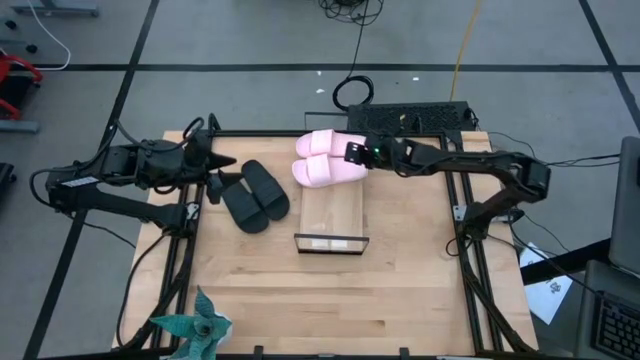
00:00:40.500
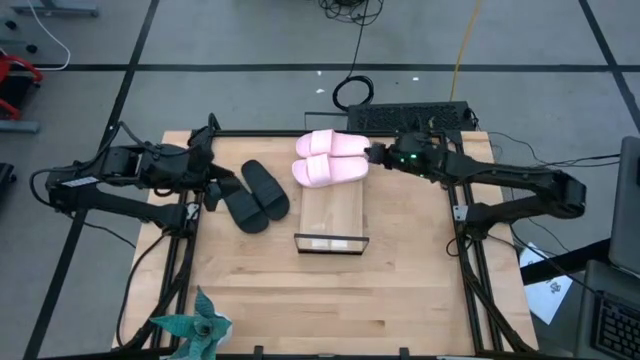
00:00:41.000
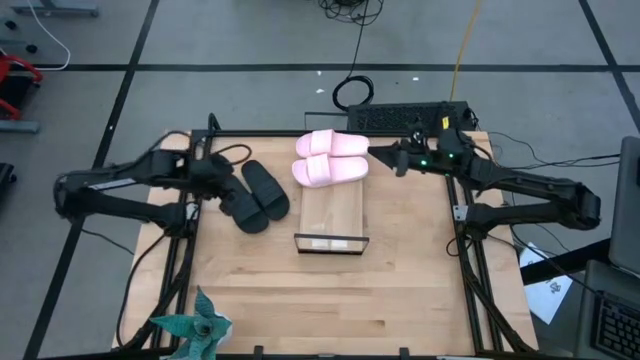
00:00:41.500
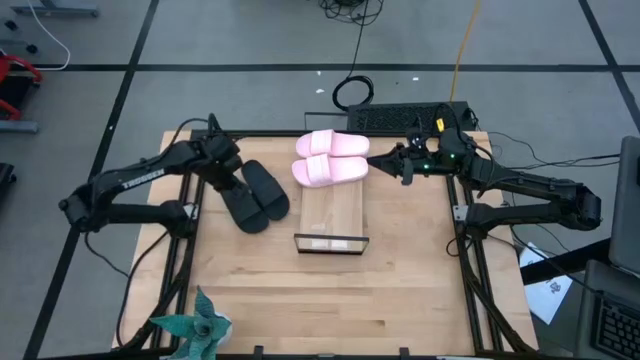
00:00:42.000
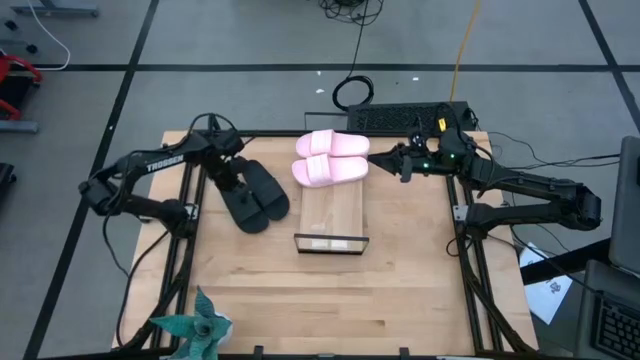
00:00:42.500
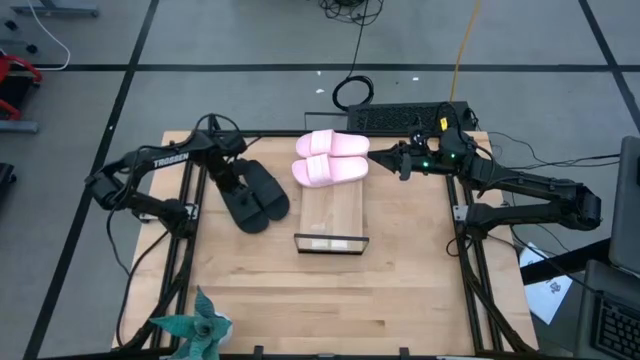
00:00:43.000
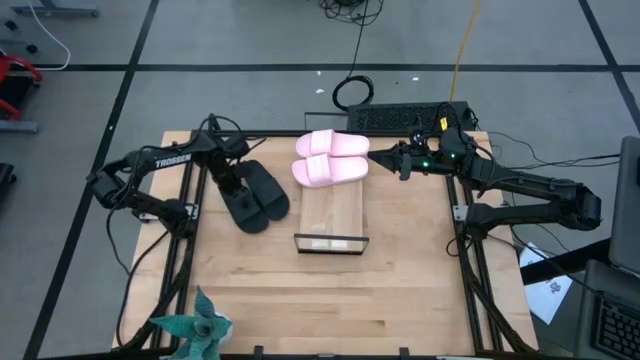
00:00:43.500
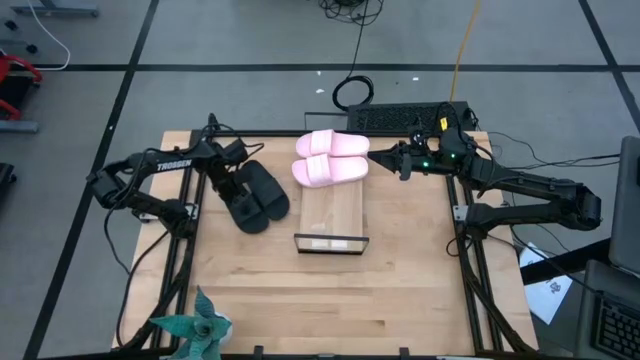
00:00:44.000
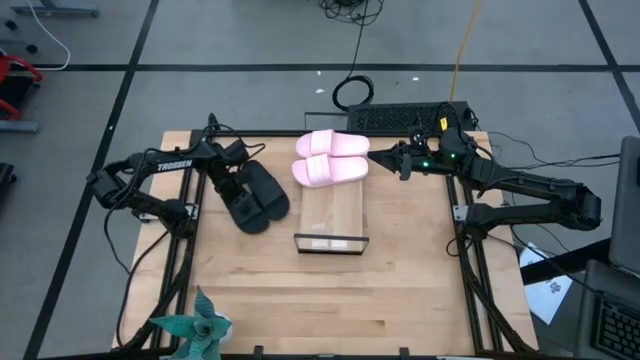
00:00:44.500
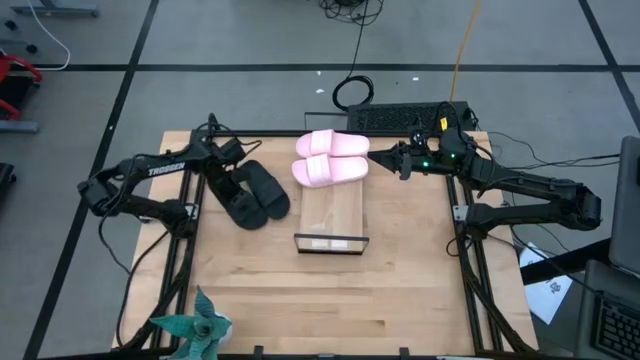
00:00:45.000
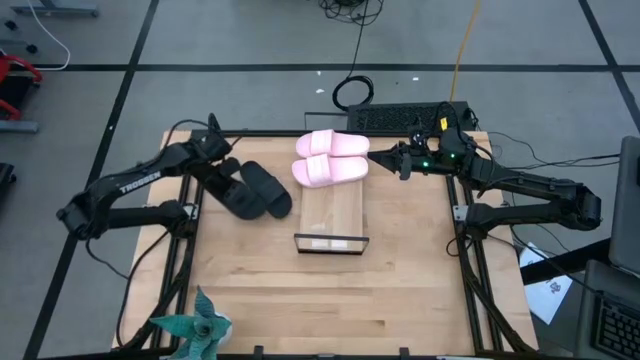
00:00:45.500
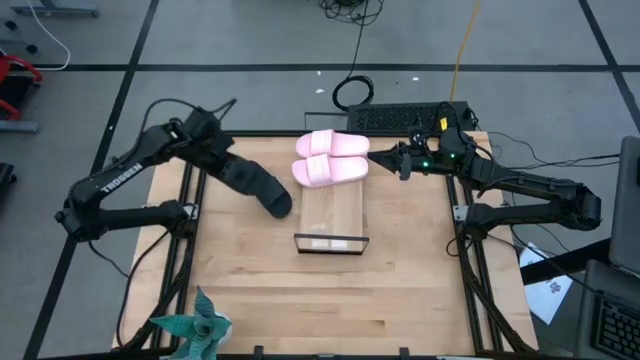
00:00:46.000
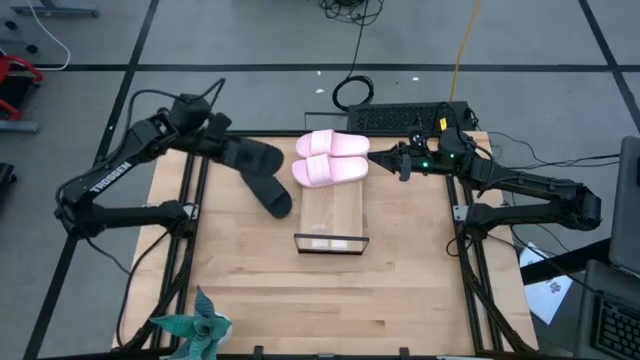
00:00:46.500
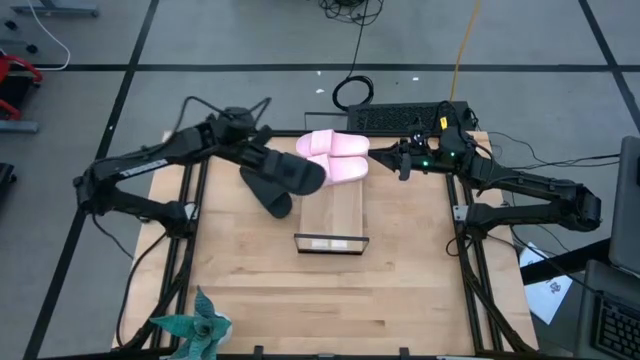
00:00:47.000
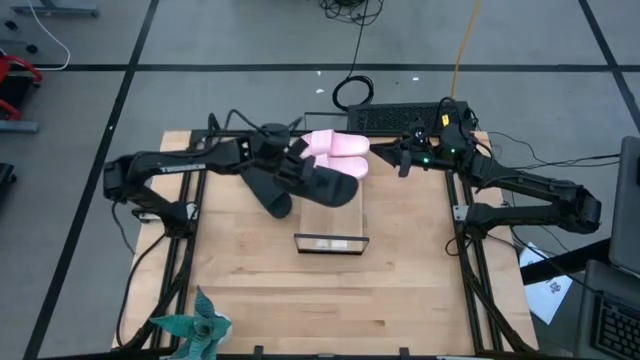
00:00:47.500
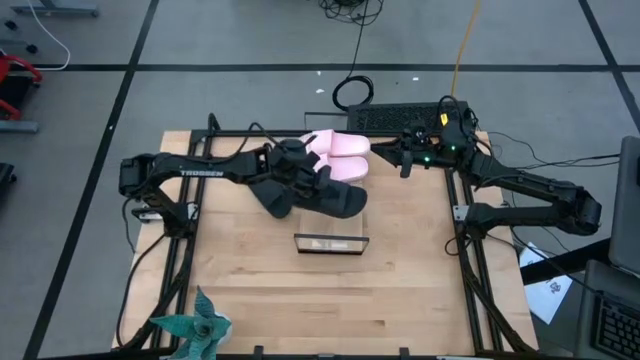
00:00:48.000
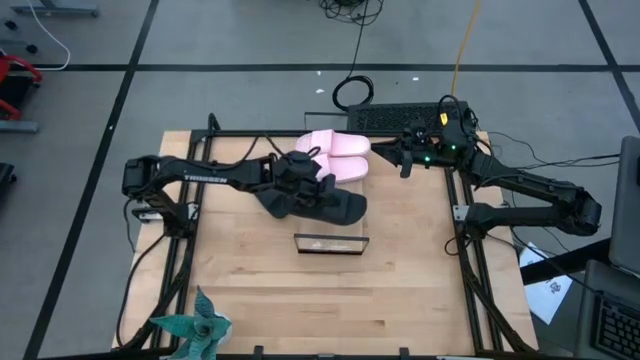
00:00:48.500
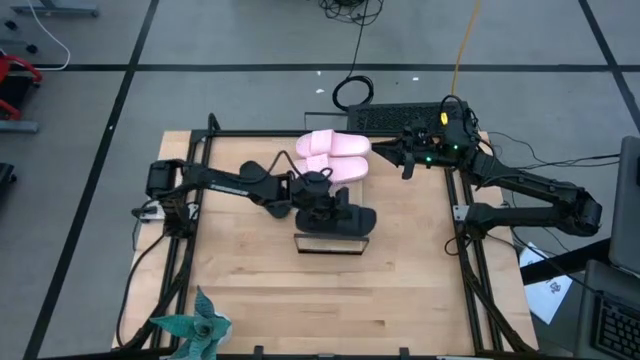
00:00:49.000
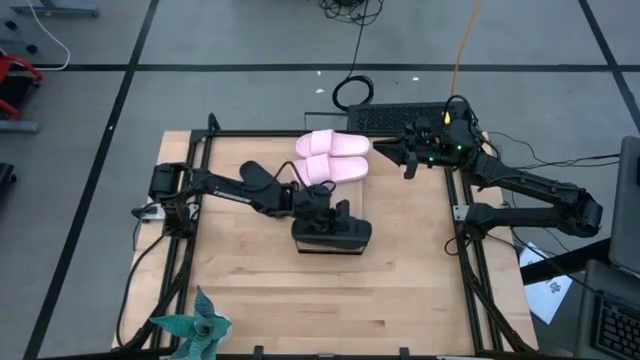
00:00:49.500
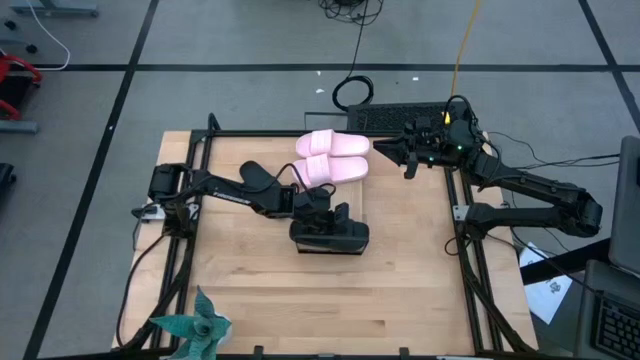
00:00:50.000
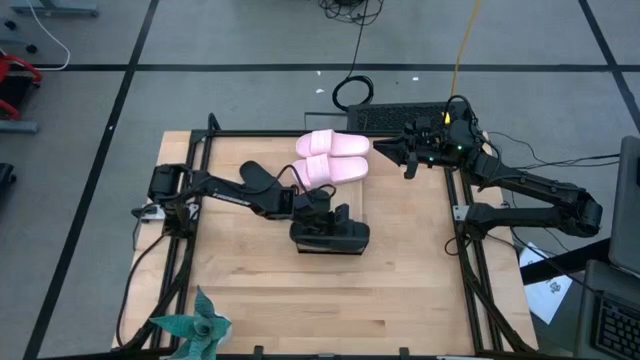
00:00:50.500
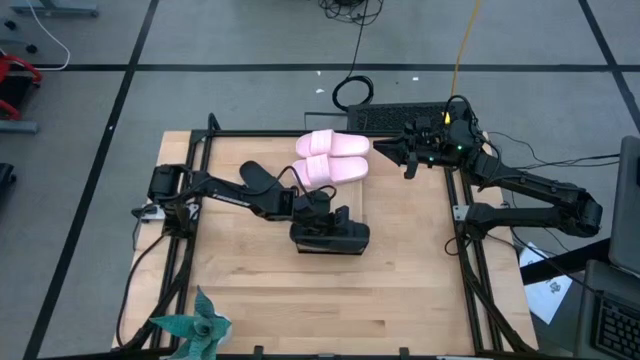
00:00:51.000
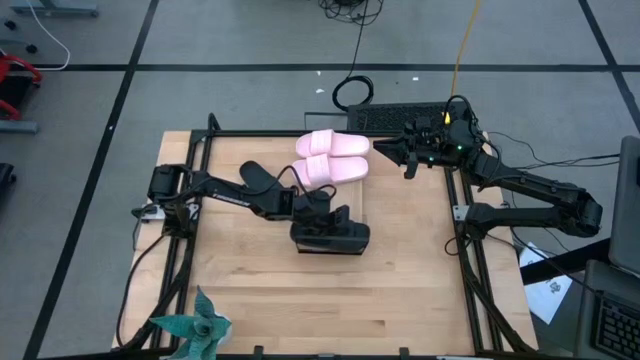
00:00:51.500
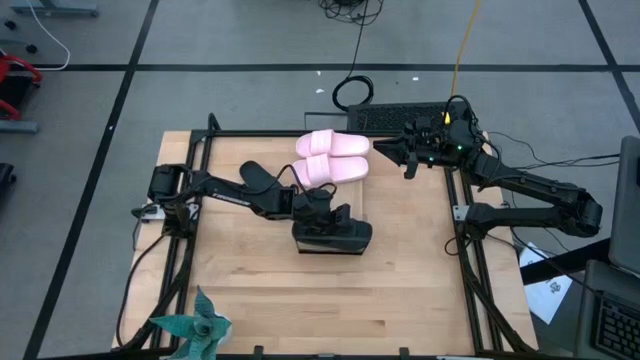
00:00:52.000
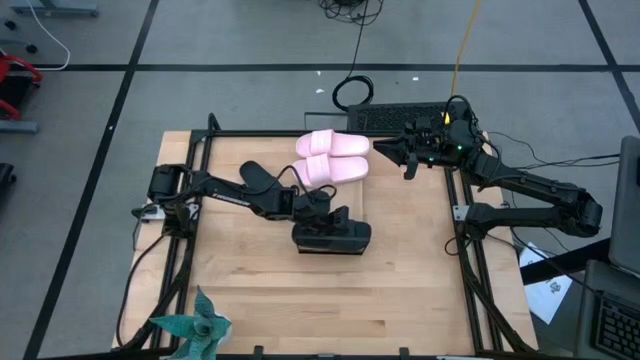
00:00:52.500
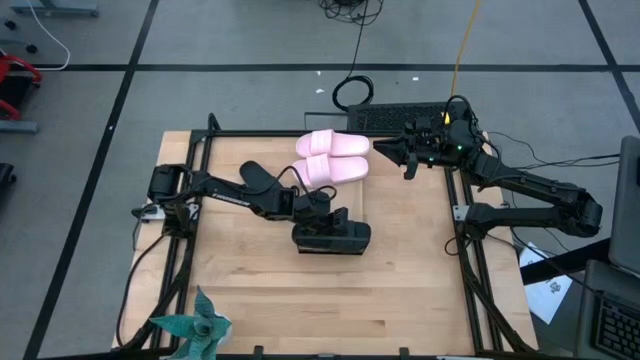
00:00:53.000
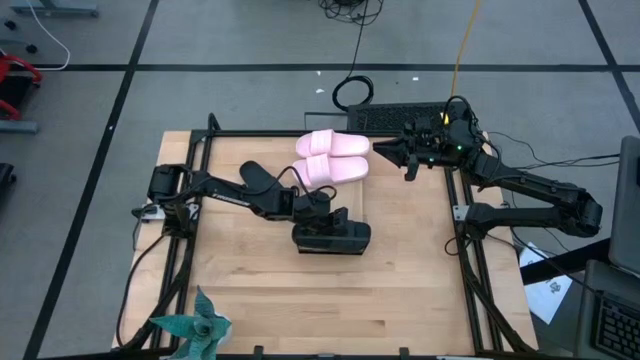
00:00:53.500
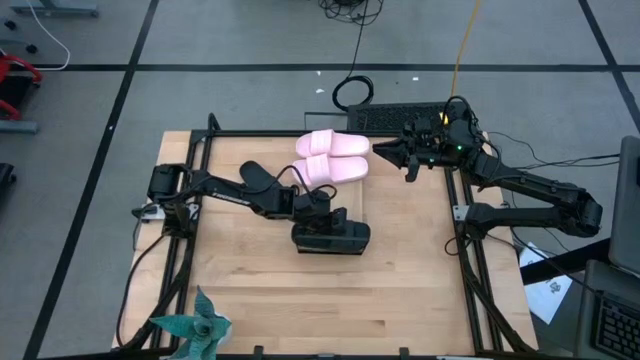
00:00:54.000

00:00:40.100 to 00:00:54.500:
Task: Pick and place slides into the shelf
Put the left black slide on the shelf
